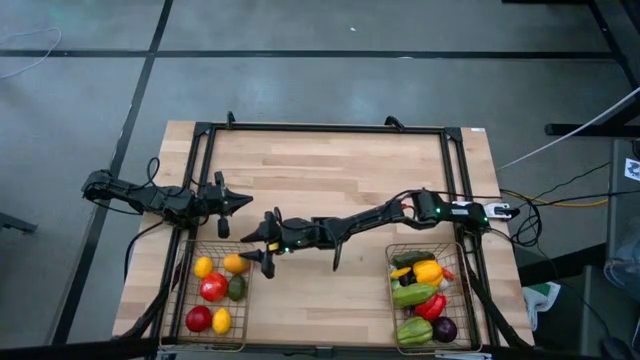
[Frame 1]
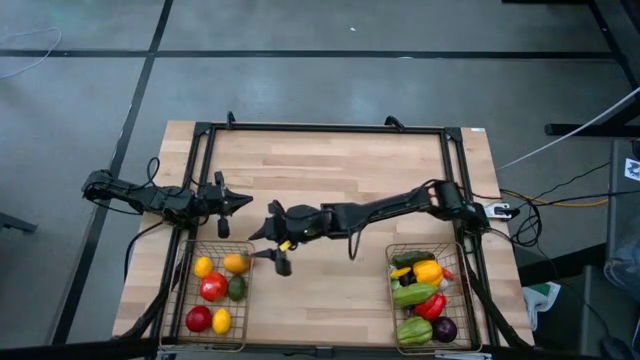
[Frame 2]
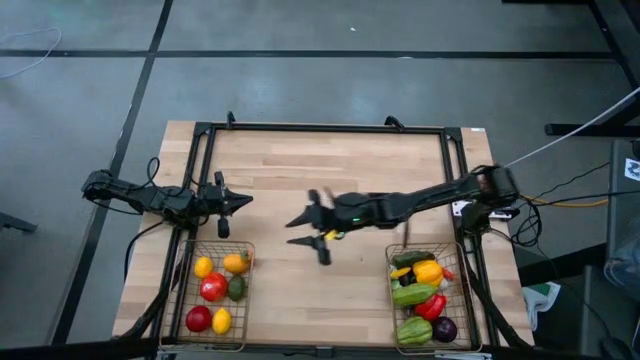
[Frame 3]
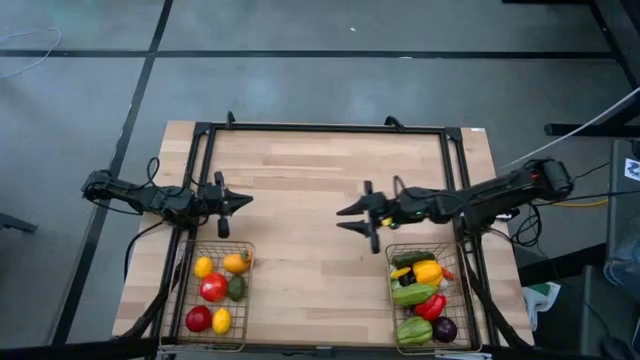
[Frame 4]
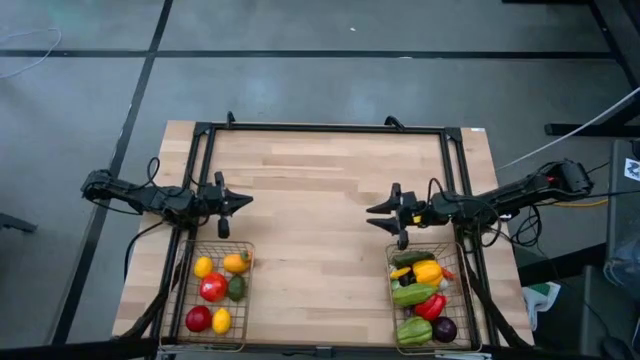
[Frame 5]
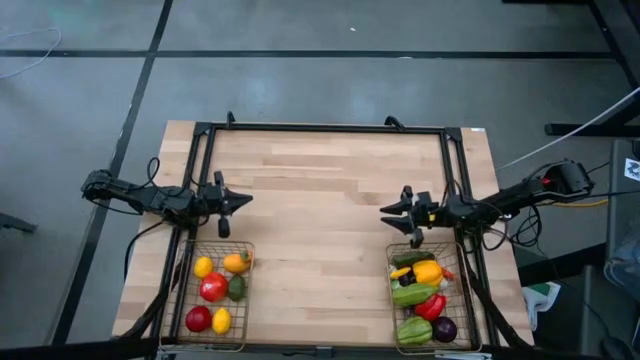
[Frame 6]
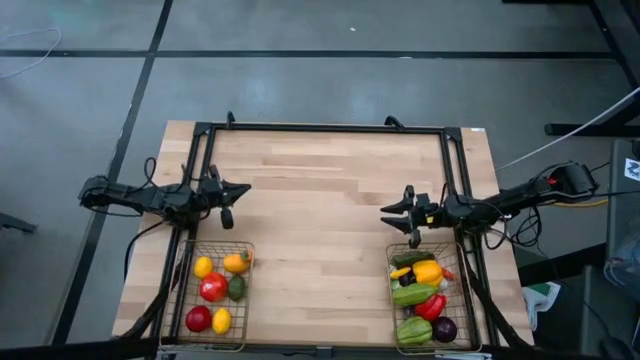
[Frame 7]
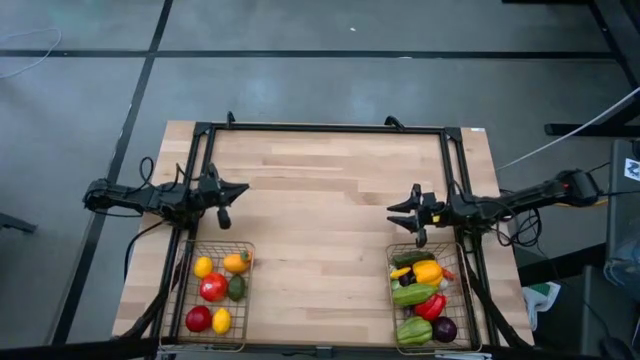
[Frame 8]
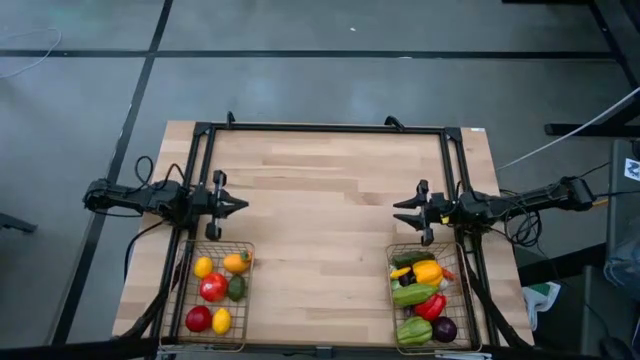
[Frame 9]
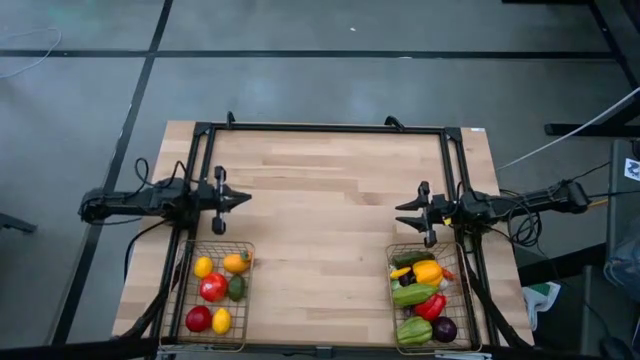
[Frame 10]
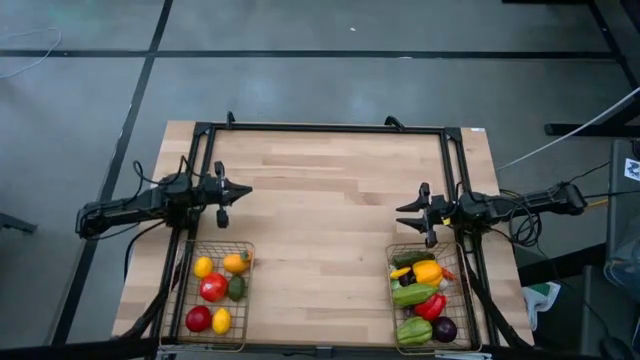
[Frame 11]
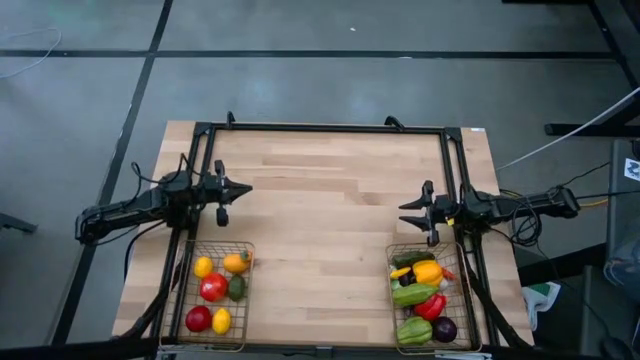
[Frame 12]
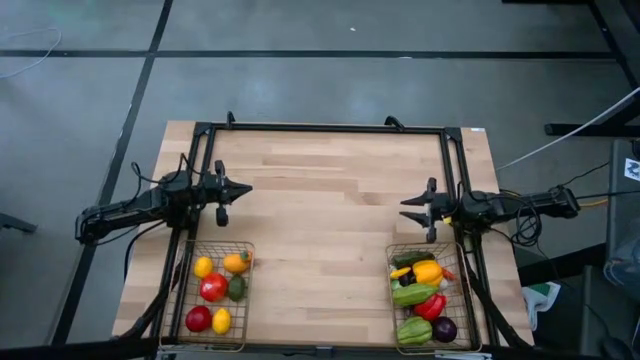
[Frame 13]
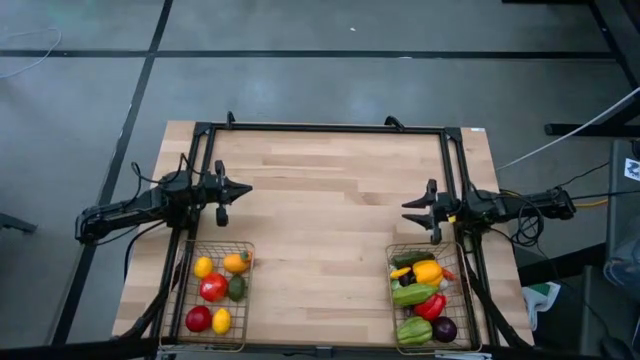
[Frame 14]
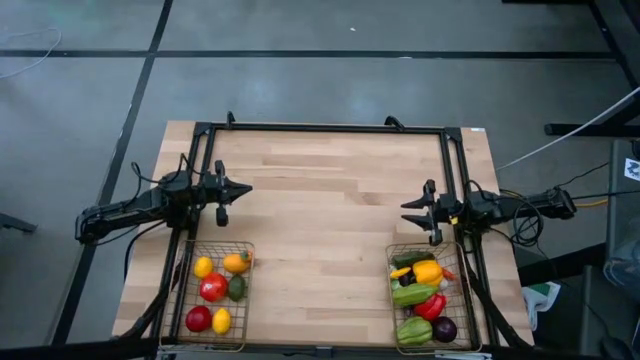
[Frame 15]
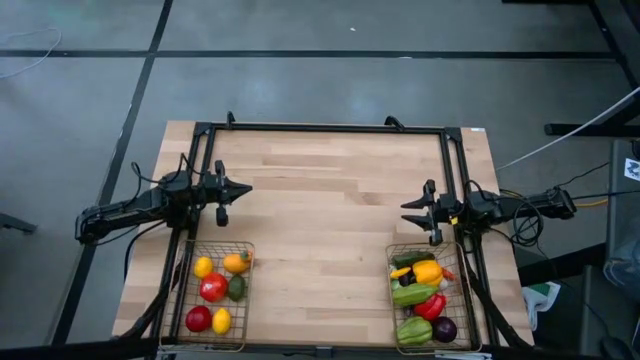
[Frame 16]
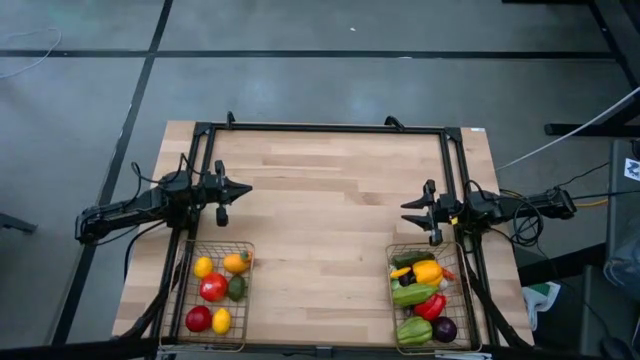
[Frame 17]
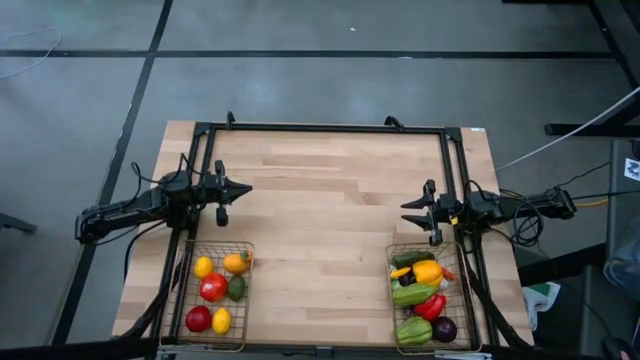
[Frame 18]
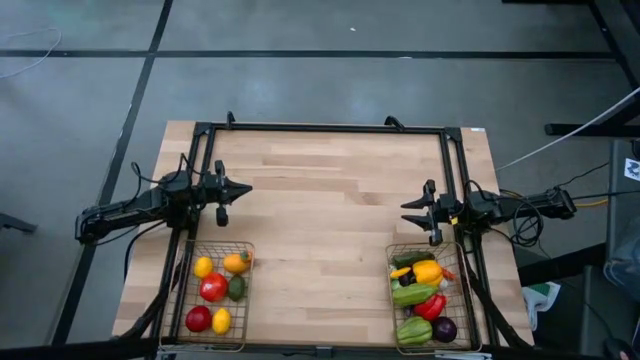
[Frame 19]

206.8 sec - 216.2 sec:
Task: Sort produce into baskets
Return to Home Position

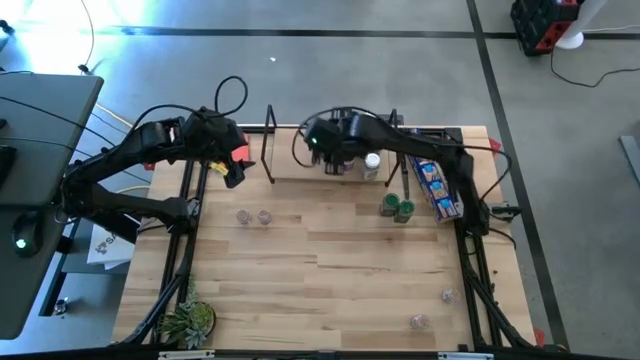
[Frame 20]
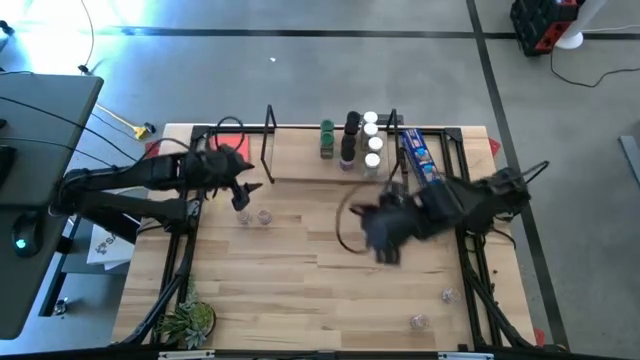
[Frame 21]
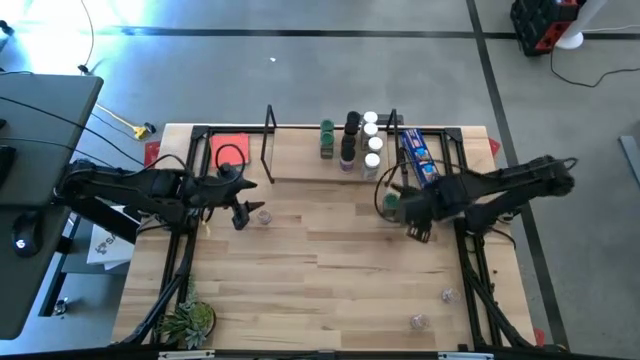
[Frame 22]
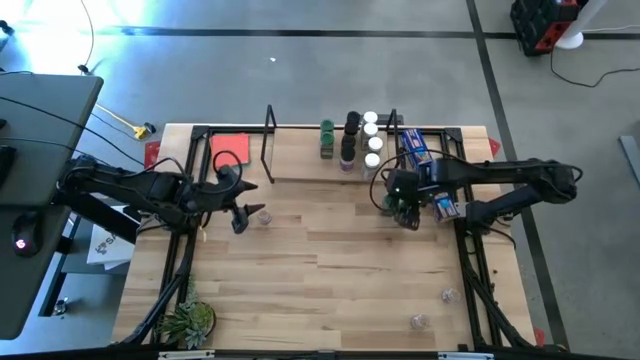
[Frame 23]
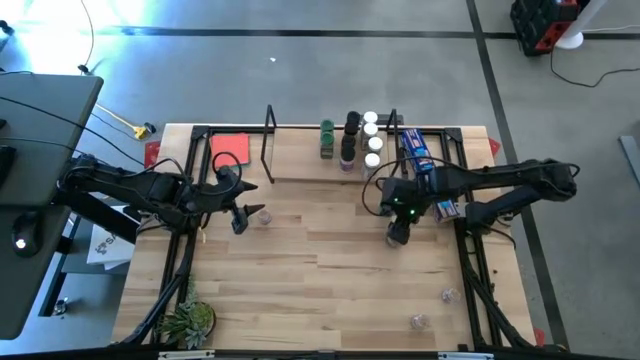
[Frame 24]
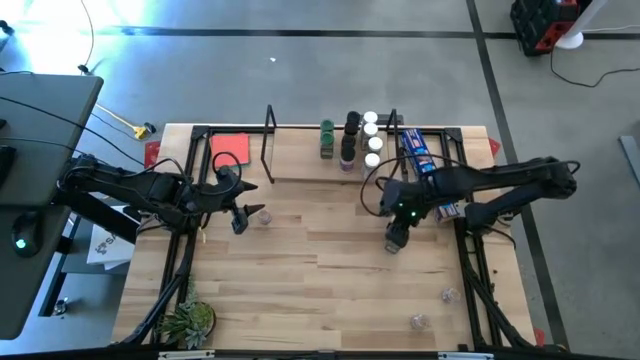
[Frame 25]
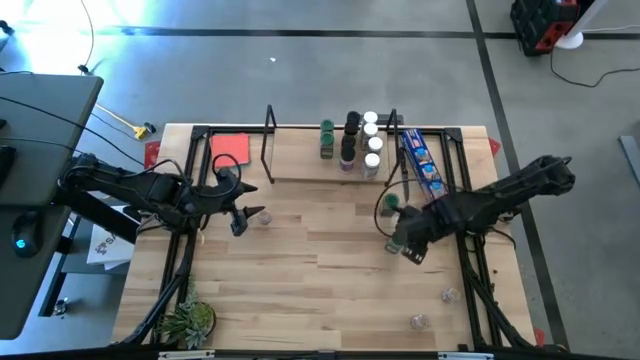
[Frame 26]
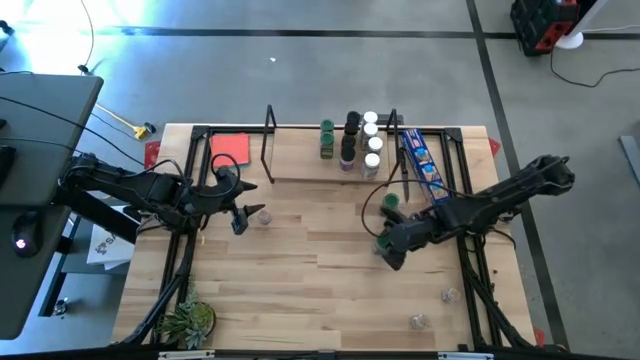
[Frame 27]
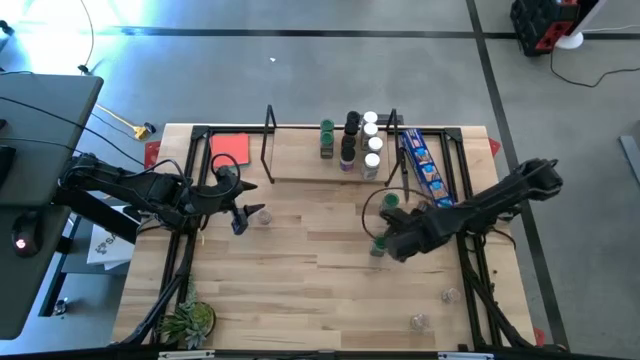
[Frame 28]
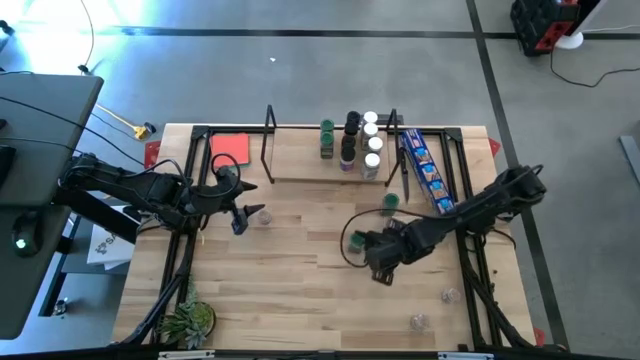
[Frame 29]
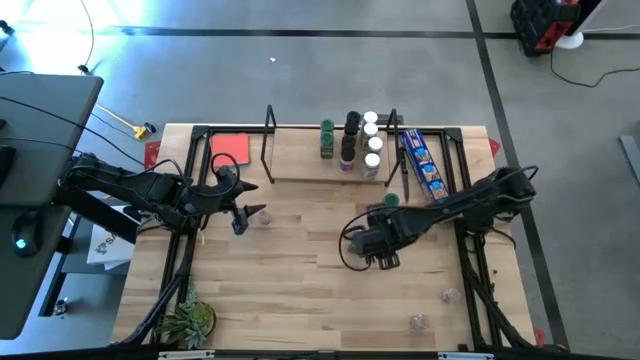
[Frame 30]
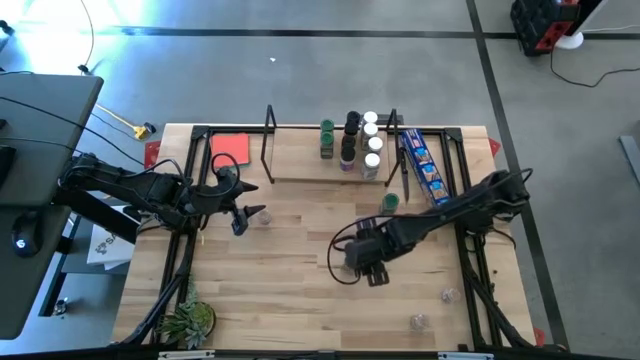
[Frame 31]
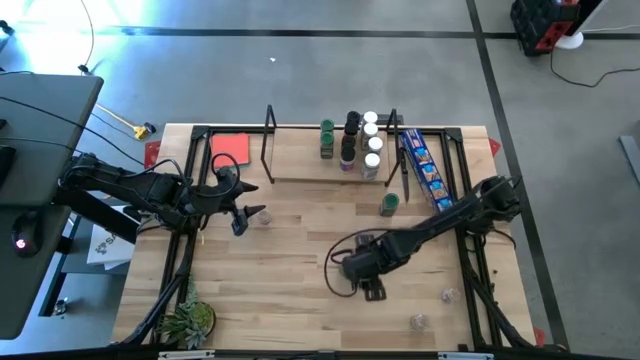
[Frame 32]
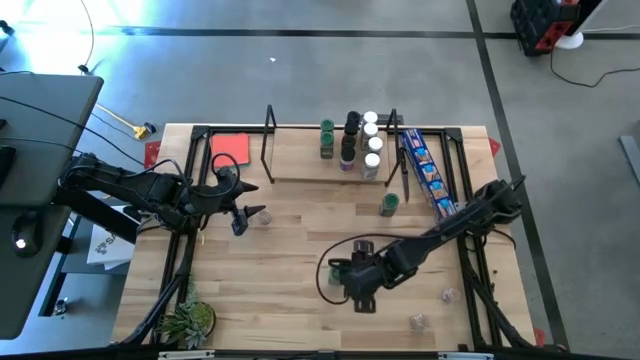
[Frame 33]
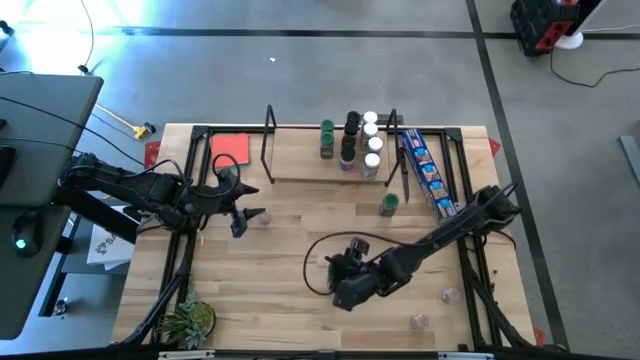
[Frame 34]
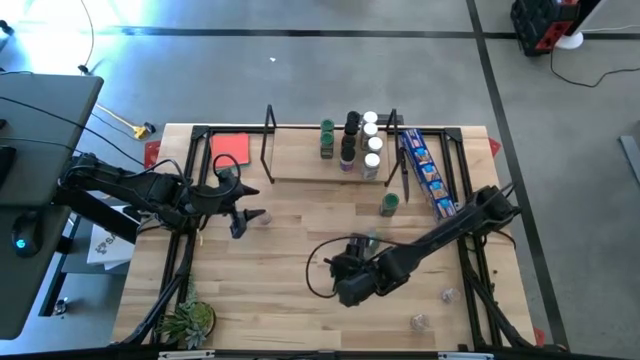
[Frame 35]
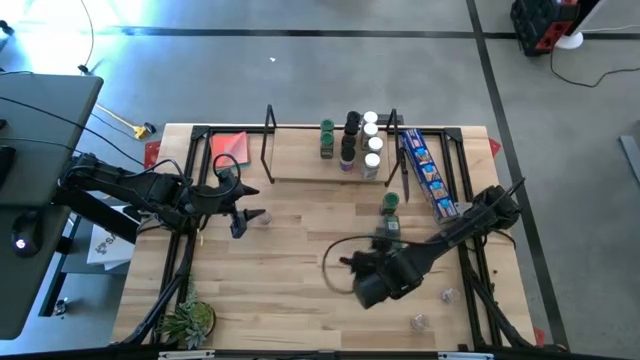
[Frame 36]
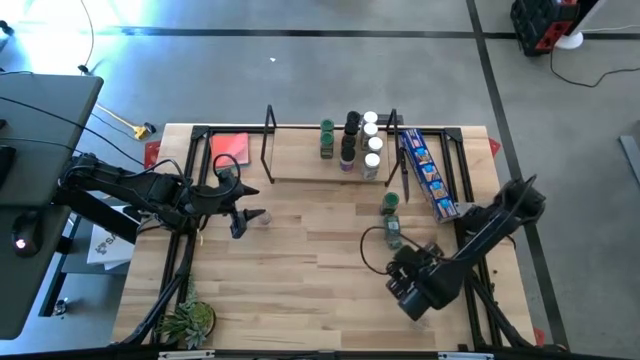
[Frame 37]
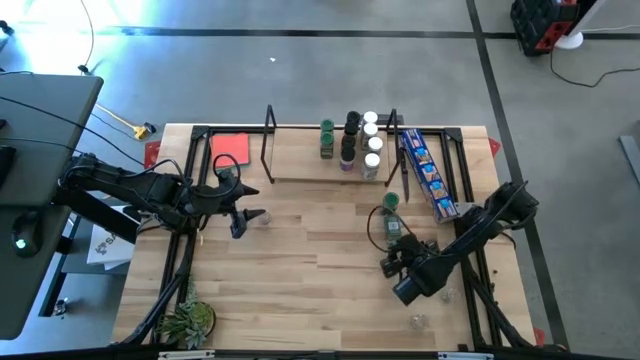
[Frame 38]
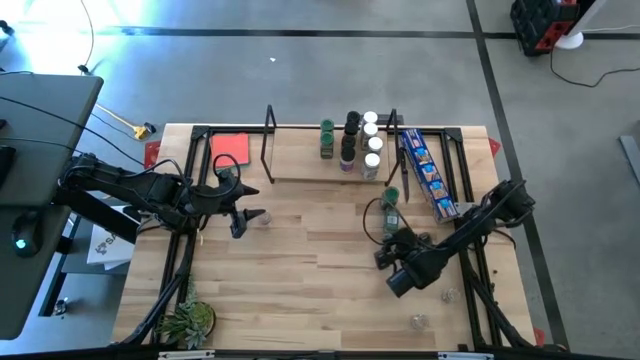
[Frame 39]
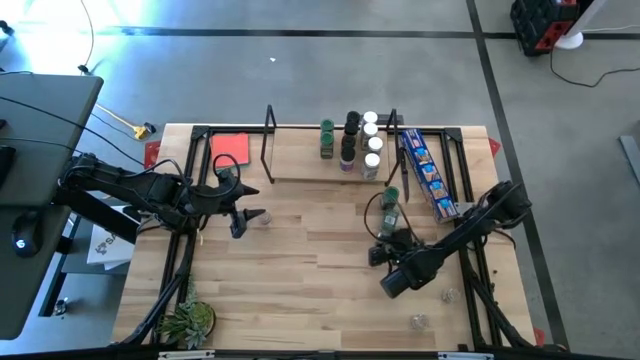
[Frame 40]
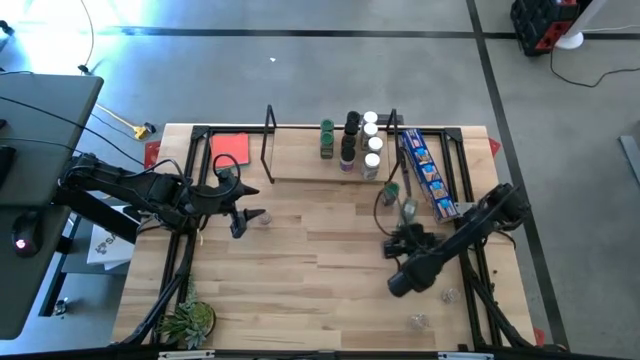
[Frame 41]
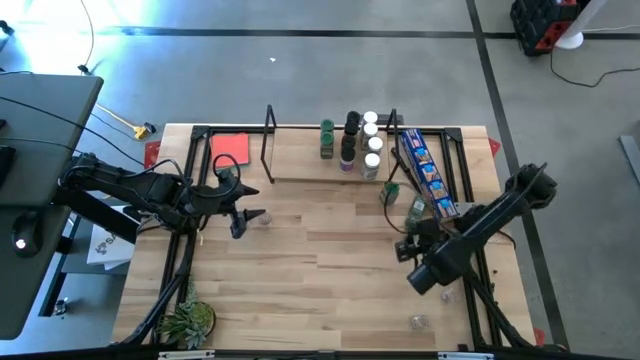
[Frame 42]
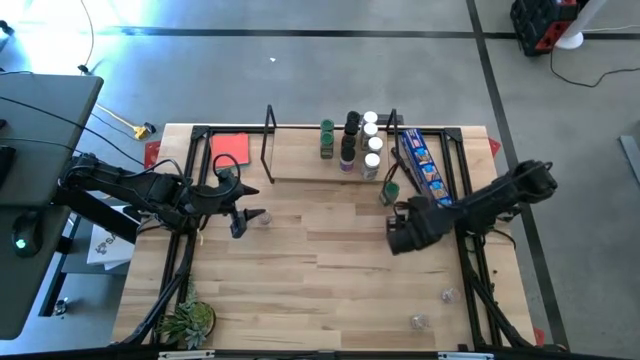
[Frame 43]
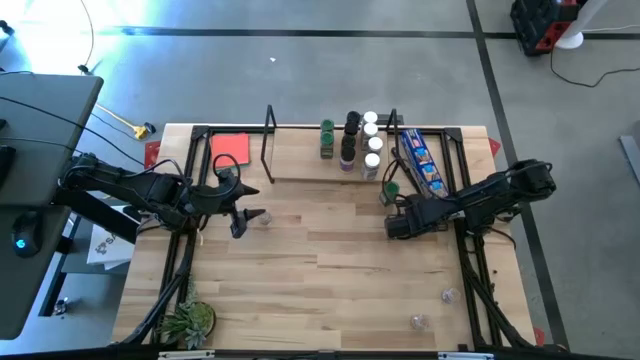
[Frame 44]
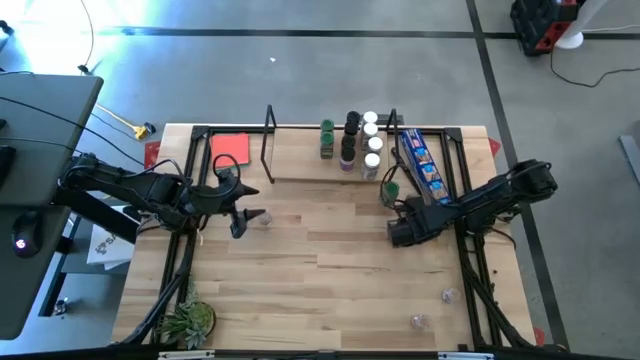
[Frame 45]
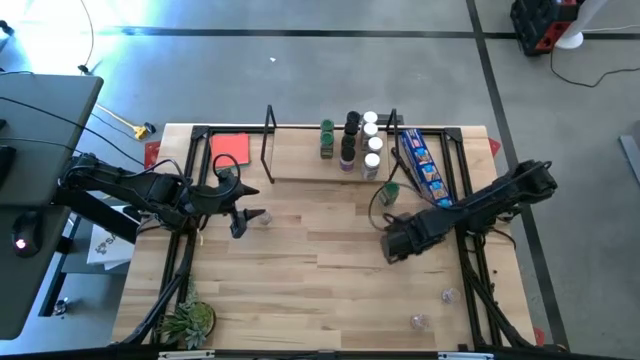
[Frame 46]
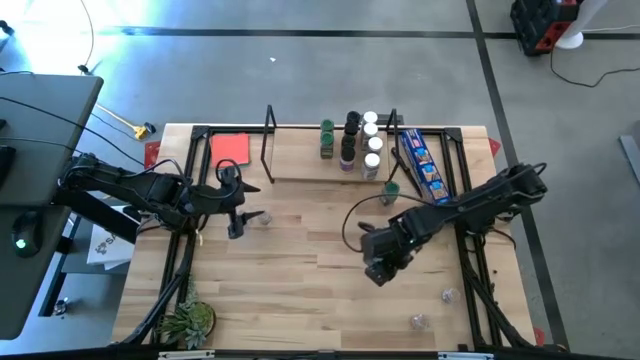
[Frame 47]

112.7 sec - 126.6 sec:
Task: Shelf spices
Put the left green seasoning bottle on the shelf aligned with the other green seasoning bottles
